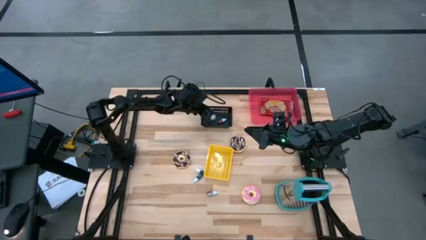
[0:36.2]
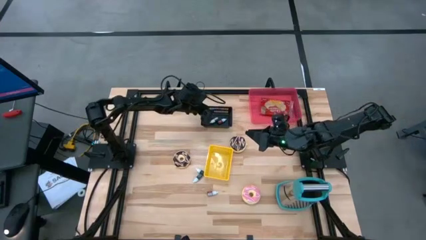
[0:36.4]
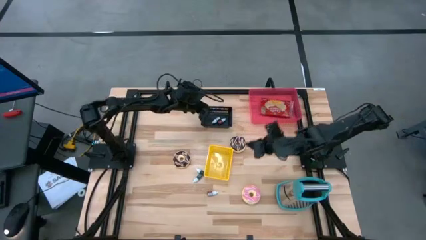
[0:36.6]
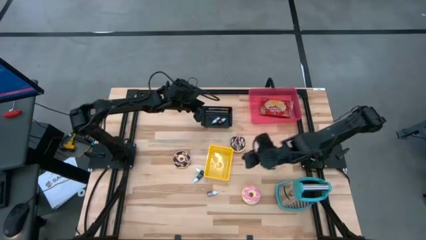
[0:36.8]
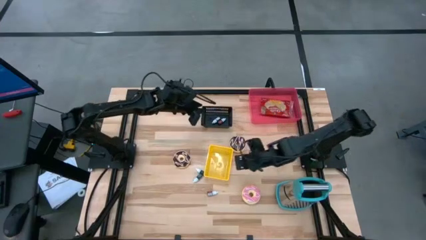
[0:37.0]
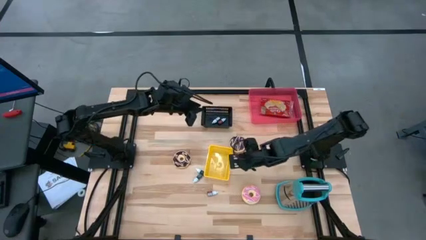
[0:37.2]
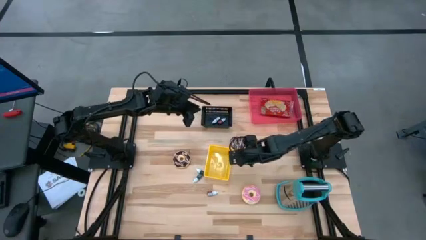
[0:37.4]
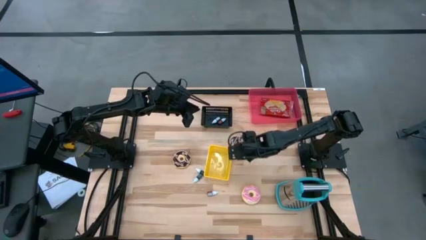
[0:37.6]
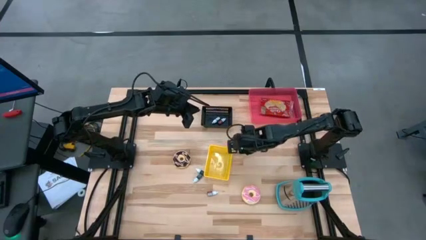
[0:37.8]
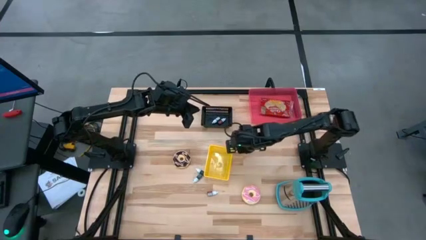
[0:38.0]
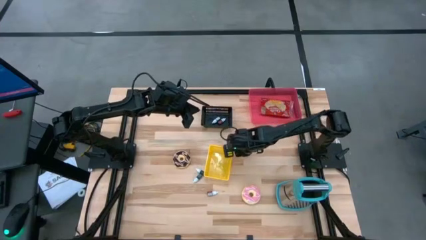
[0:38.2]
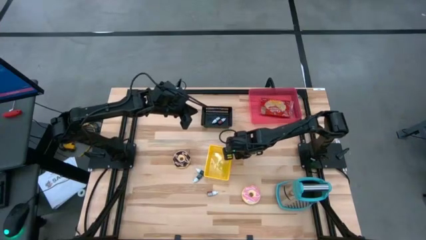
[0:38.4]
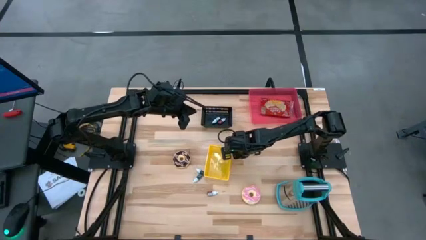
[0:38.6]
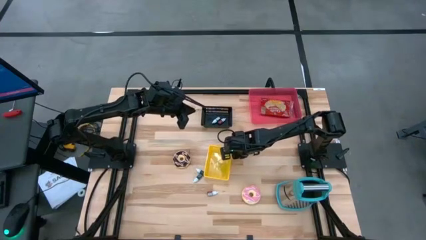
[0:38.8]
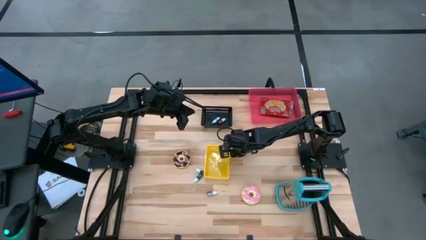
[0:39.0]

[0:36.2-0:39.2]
Adjust the yellow bin

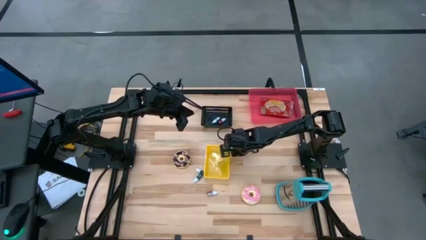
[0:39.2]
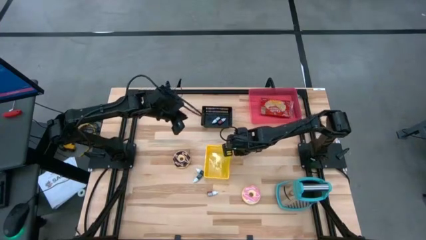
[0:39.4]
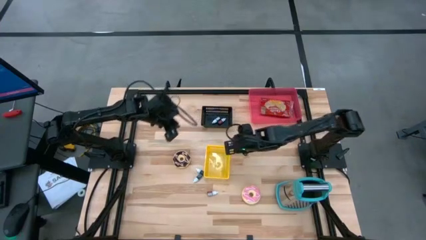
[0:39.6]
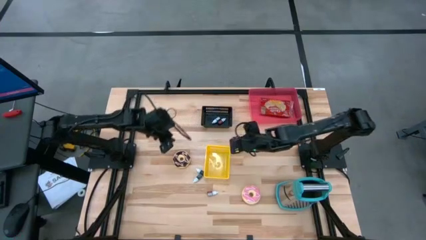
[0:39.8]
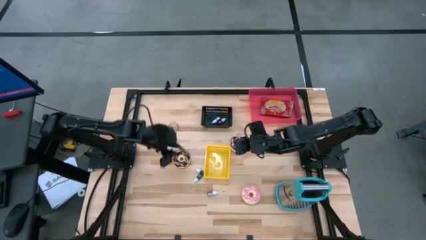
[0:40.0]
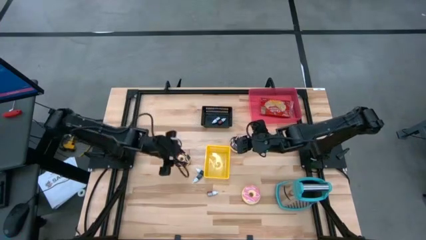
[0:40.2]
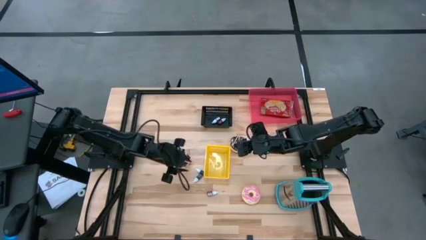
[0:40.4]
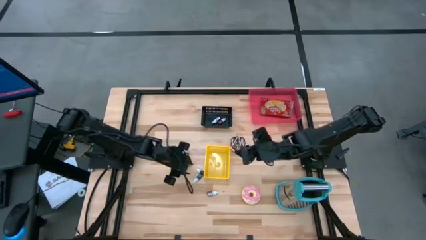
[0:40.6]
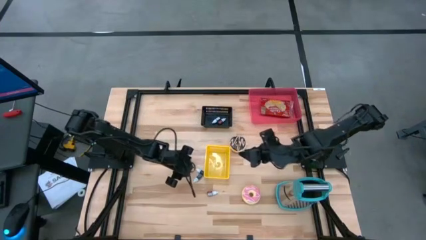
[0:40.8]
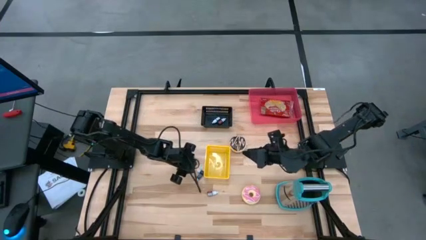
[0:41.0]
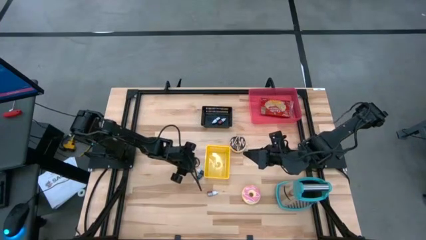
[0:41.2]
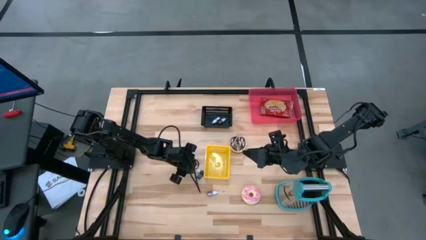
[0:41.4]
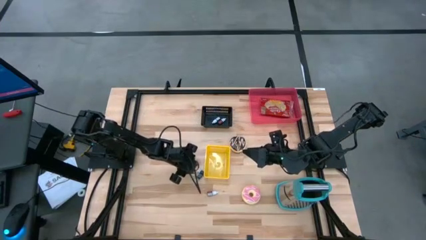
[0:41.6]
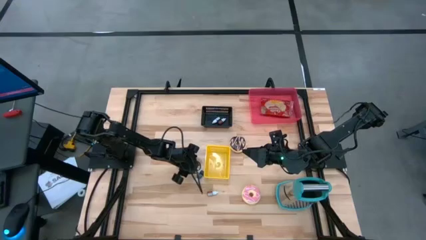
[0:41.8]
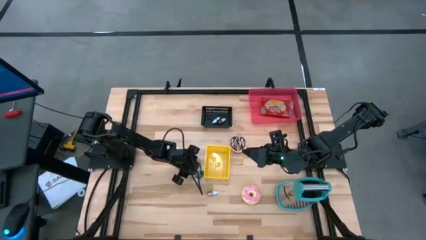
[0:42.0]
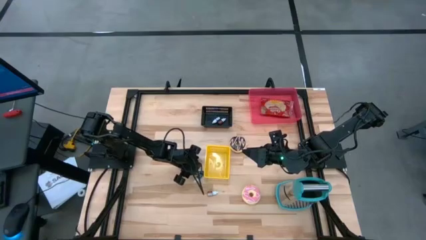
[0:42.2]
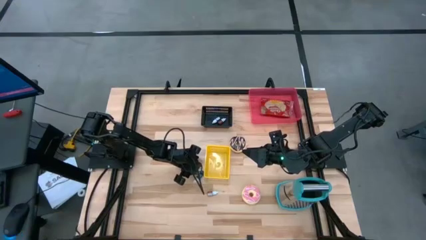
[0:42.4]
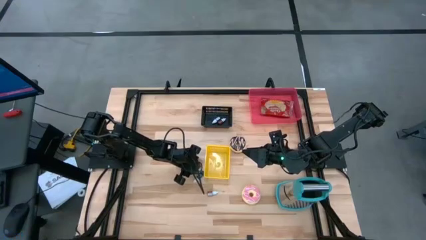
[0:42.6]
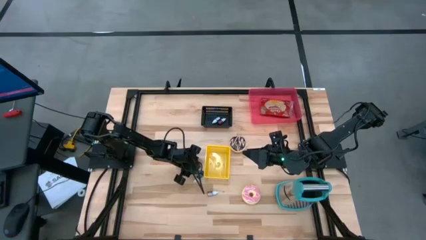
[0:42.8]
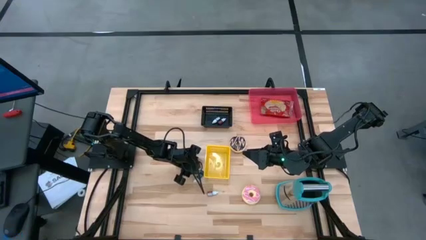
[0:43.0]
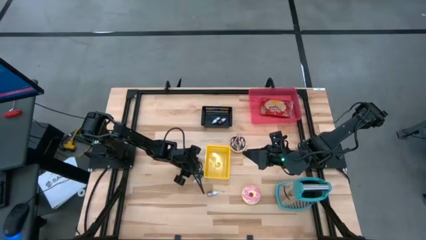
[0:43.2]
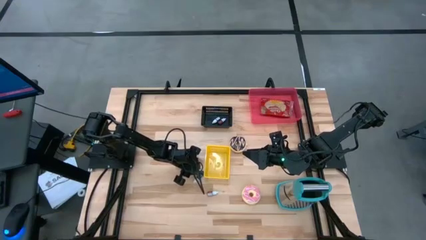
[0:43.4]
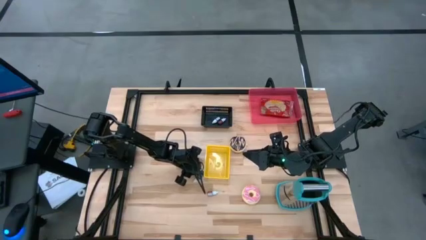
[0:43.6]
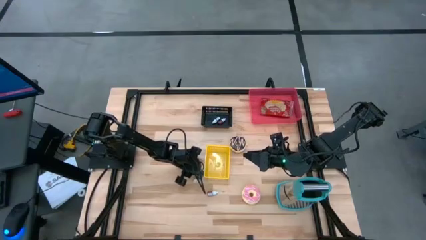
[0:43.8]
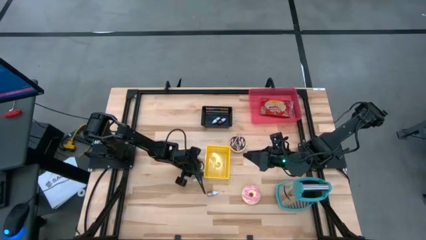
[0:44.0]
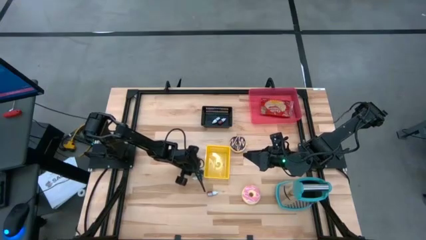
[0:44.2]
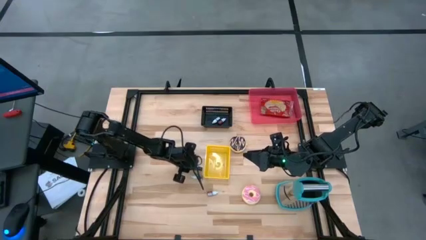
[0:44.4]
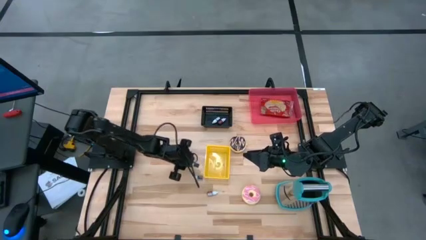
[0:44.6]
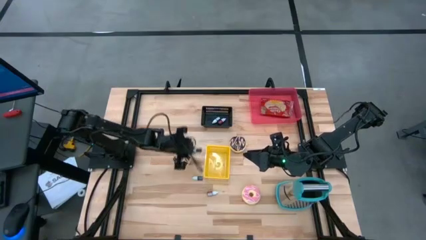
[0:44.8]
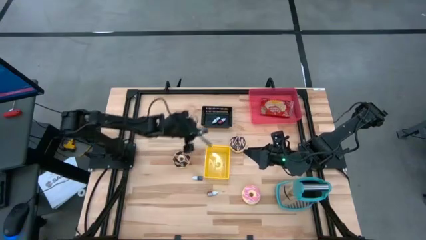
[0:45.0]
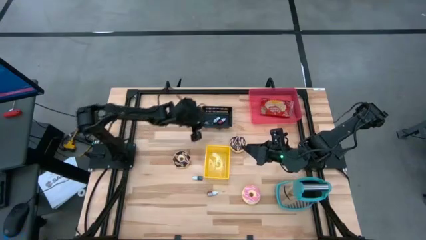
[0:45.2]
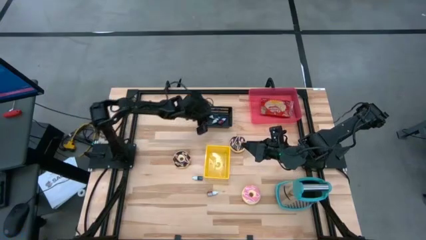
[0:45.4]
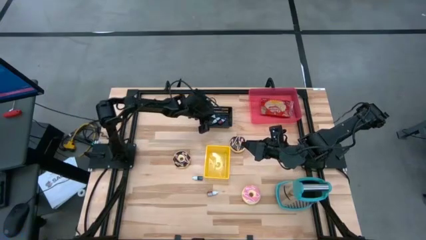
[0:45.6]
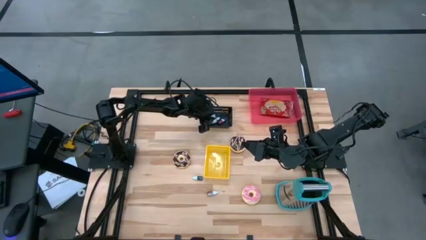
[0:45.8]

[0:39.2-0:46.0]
Put the blue food coloring bottle into the black bin

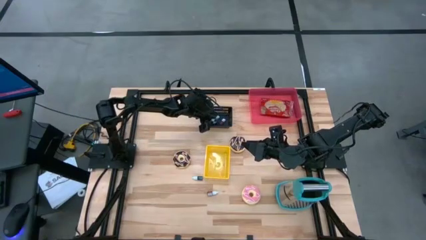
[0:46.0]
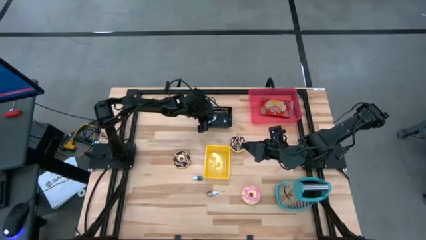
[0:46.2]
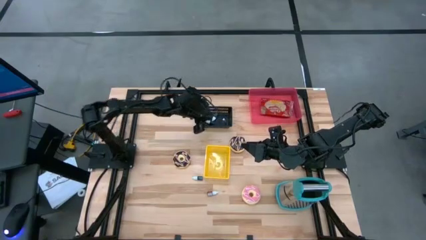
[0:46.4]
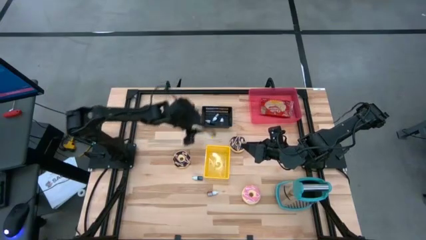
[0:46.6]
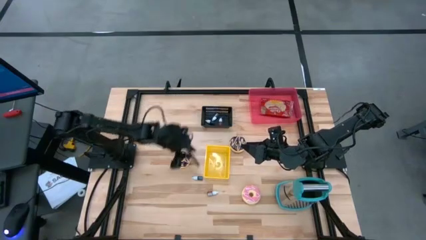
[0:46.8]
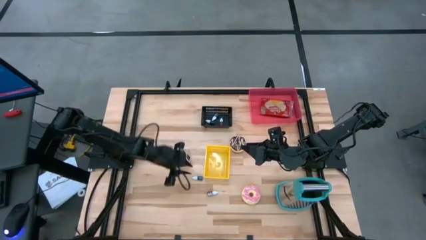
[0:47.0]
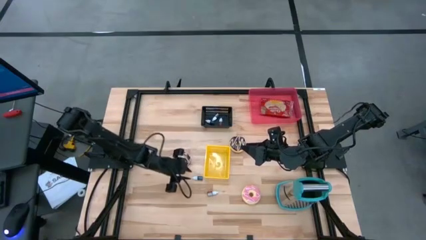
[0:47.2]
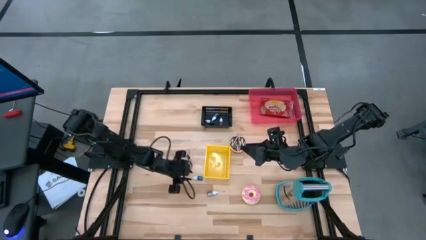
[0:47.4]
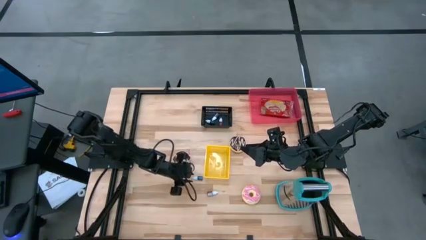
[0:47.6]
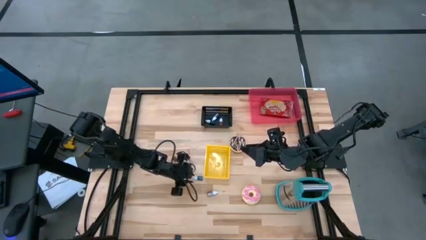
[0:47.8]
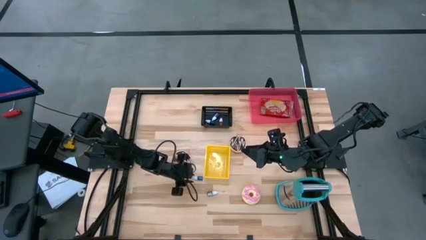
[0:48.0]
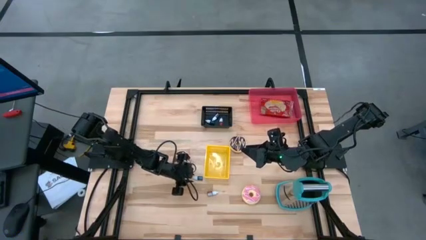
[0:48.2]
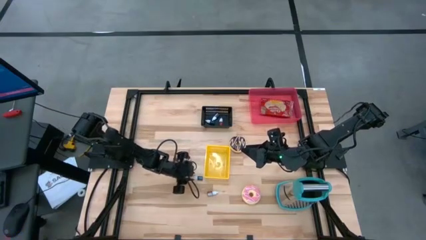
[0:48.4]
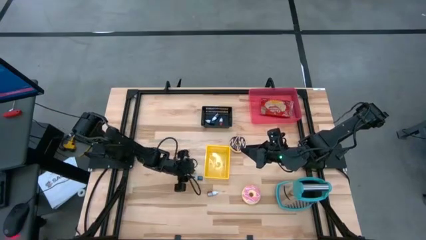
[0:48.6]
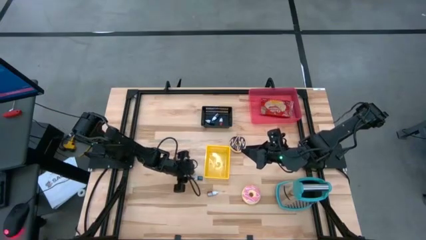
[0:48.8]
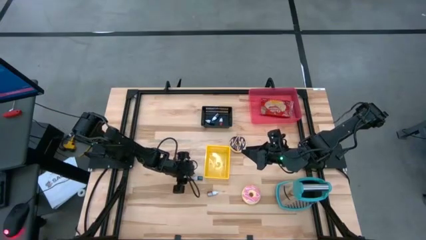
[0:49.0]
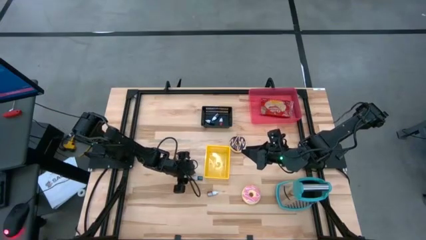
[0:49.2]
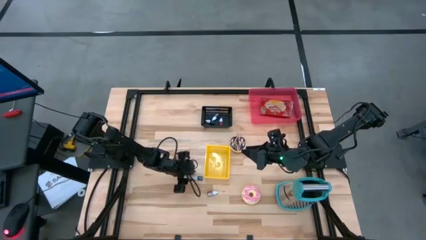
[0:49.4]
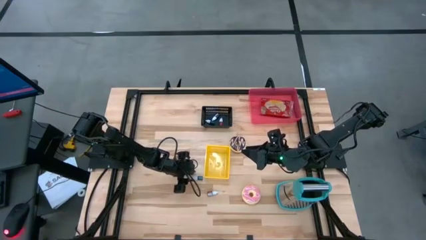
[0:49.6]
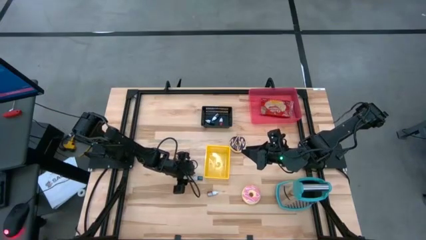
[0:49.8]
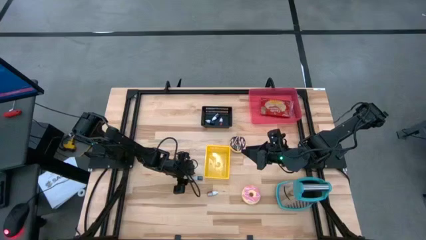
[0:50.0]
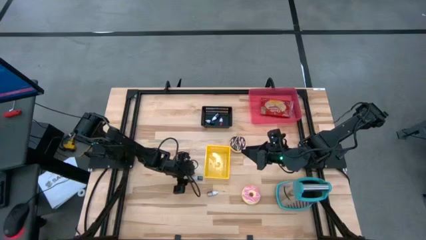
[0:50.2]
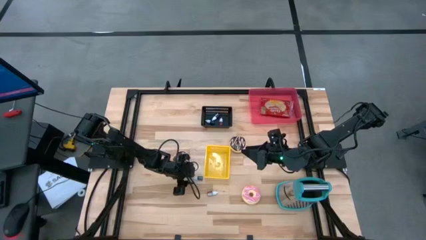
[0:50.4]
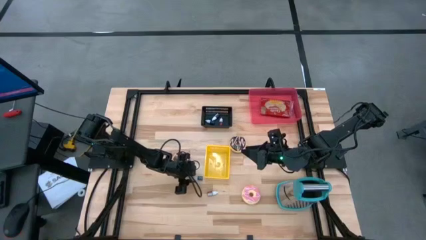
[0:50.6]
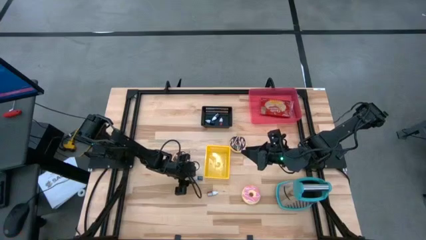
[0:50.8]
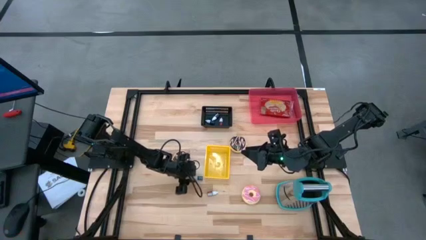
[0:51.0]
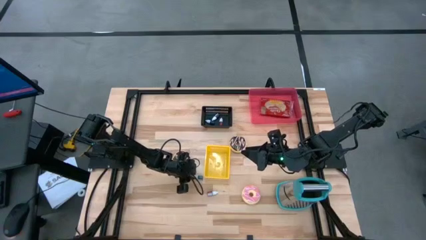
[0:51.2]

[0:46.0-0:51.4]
Put the green food coloring bottle into the black bin
